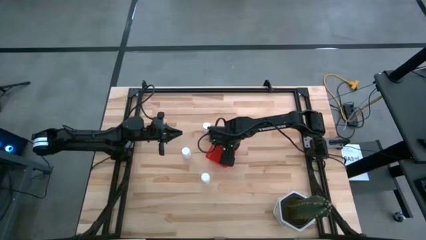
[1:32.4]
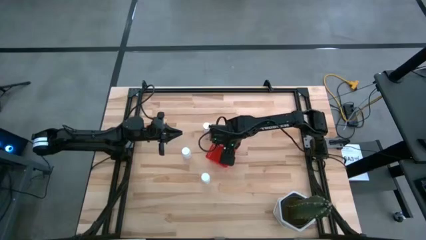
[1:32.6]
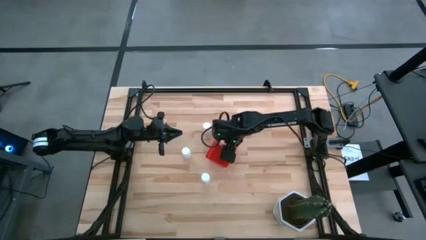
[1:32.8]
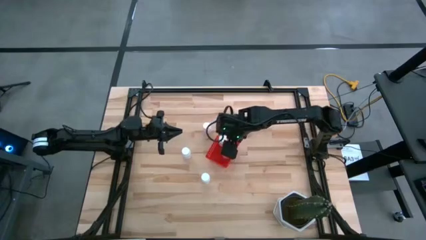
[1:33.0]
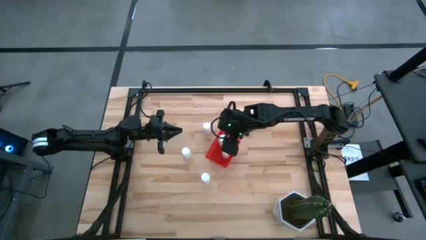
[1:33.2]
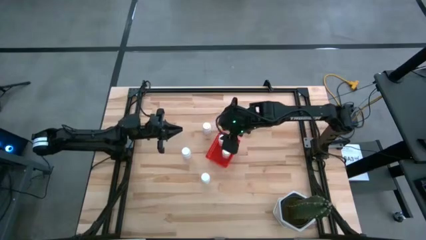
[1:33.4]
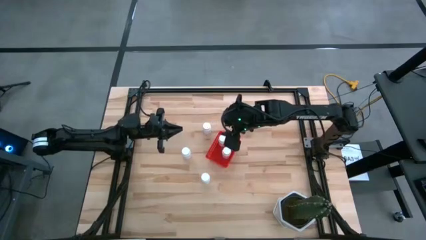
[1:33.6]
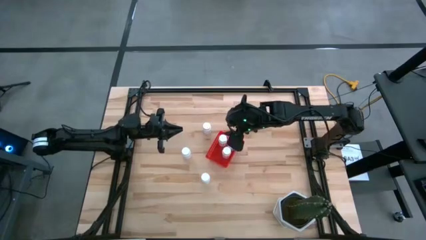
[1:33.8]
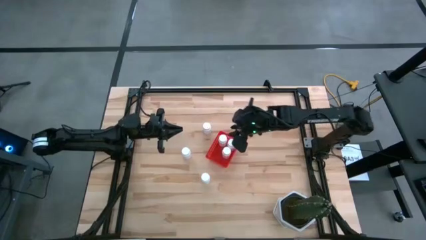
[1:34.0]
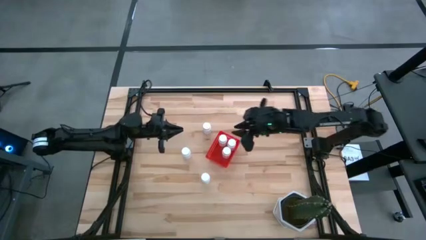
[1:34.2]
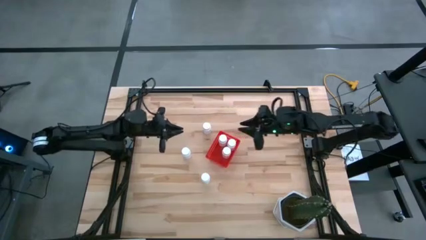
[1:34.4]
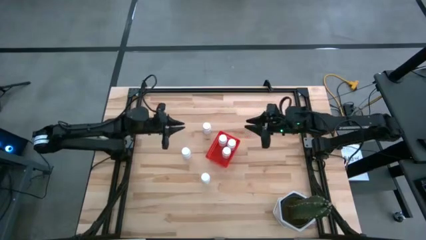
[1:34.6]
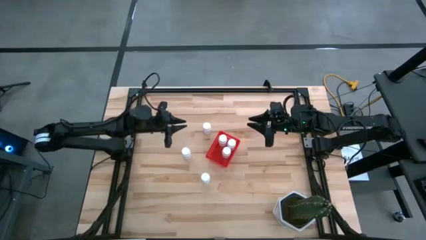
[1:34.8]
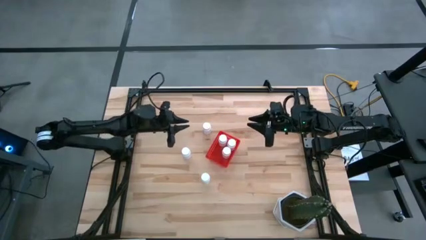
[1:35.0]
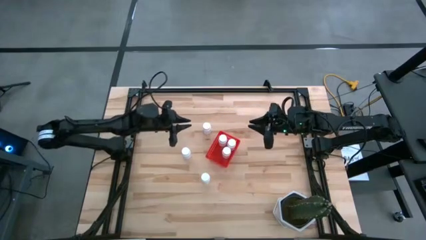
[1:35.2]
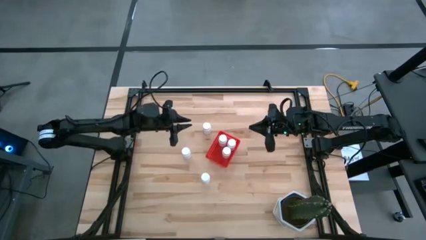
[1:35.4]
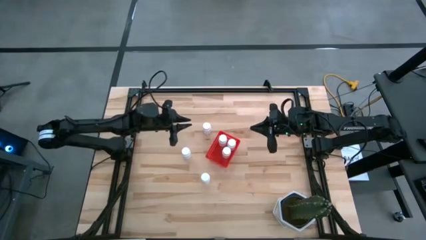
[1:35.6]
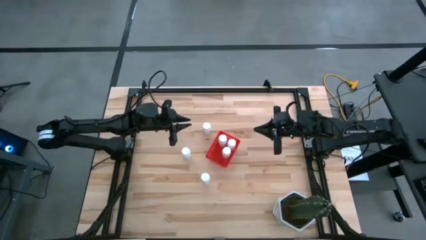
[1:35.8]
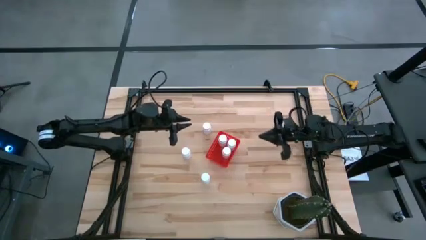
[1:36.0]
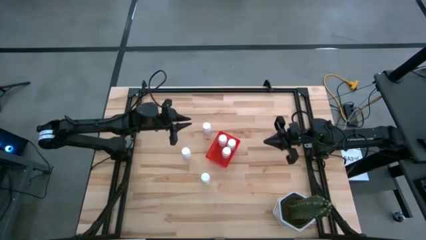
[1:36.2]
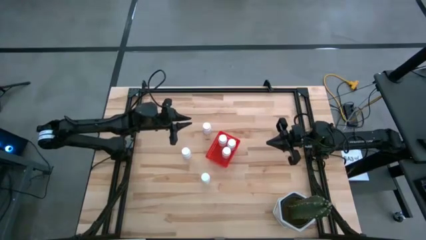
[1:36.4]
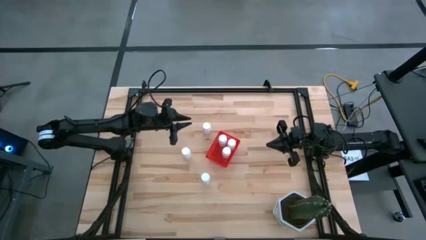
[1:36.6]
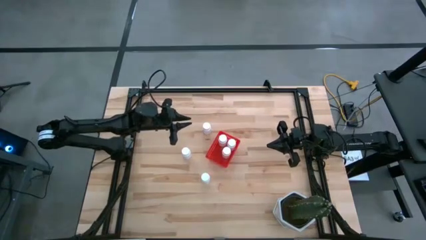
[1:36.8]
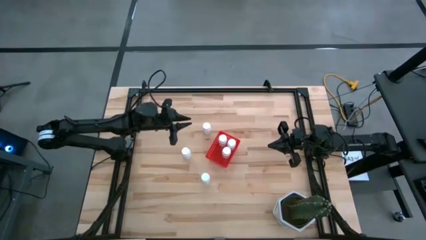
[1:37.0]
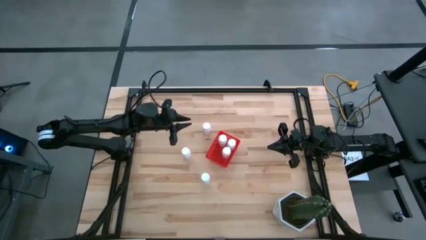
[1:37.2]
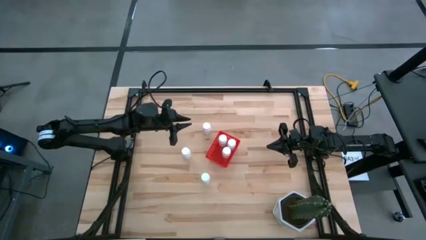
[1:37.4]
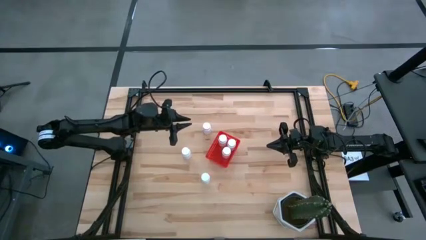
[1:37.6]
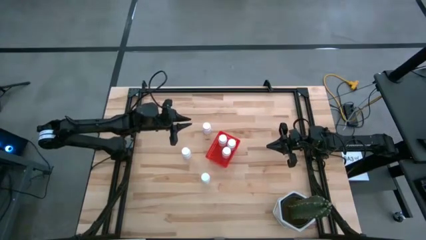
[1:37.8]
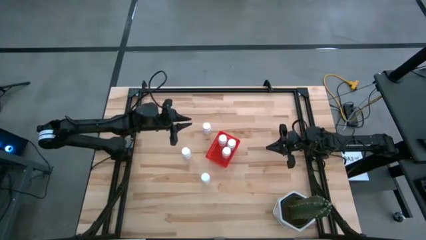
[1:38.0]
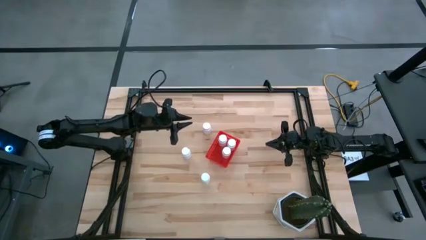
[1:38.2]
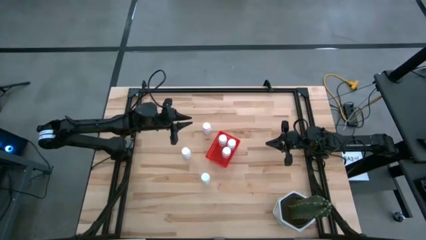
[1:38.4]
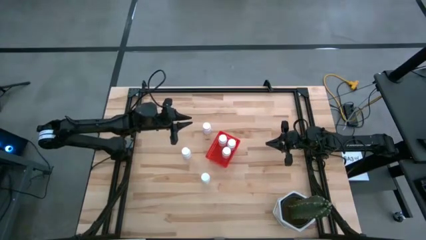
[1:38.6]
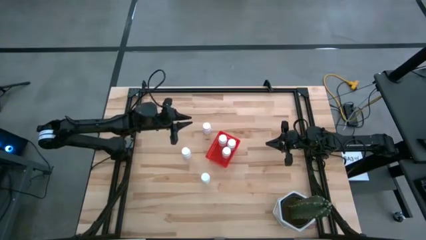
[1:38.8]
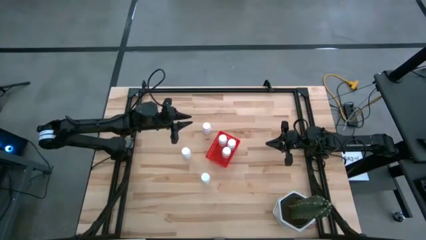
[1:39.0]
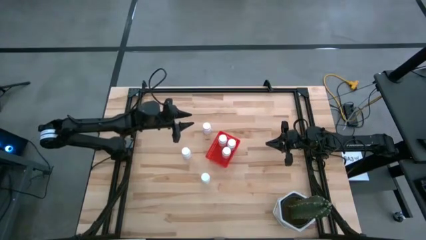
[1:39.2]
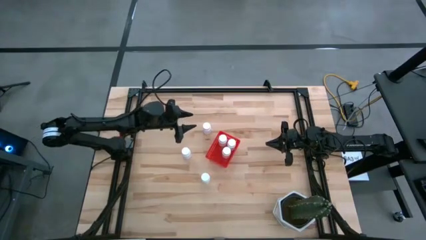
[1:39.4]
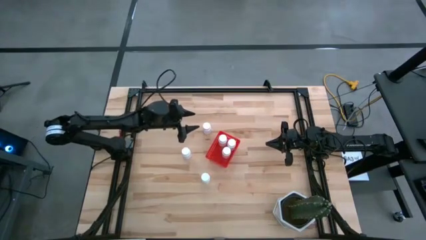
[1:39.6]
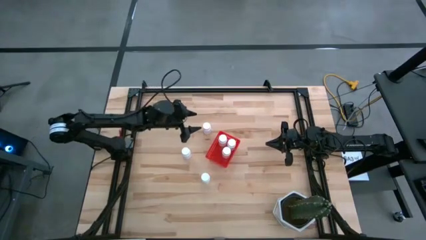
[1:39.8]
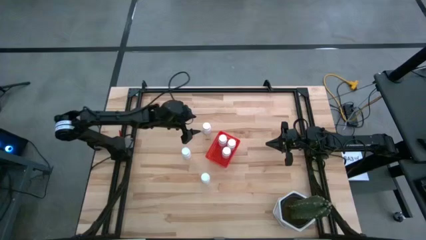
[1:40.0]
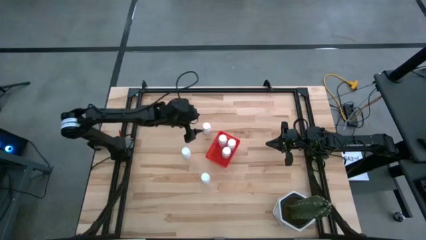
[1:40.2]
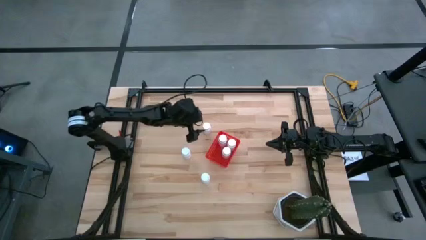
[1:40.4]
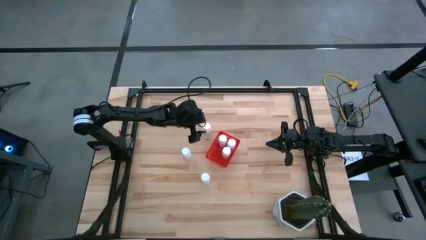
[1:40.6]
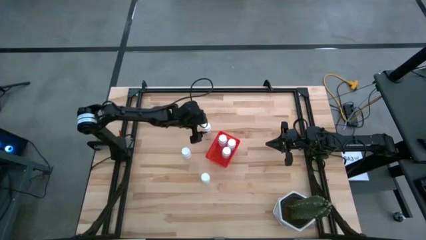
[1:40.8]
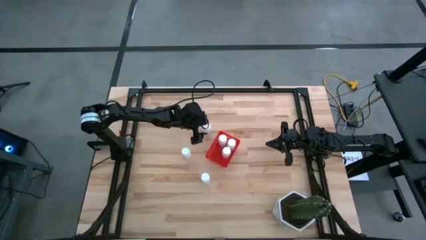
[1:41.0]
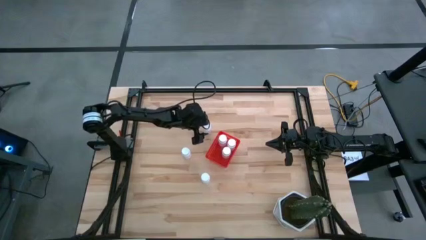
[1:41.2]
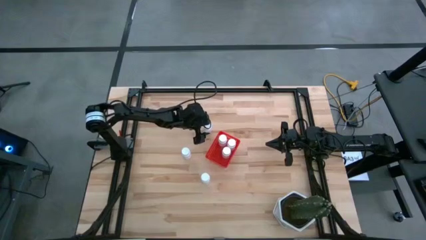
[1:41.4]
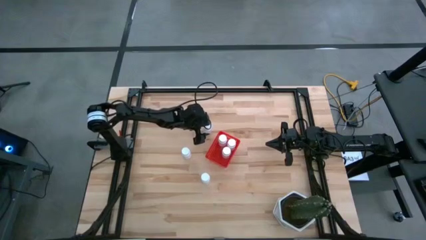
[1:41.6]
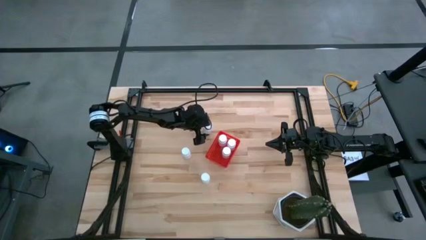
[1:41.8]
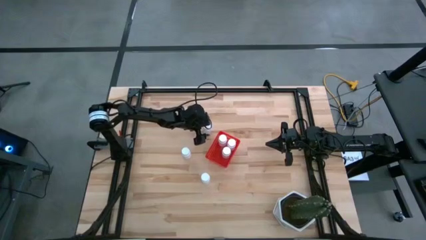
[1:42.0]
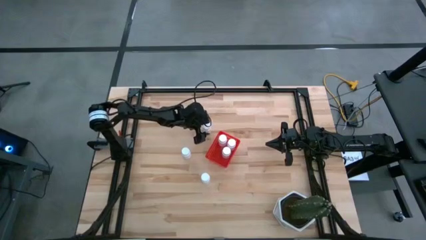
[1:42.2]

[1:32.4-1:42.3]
Task: Pick and place pill bottles into a basket
Put the top white pill bottle into the red basket

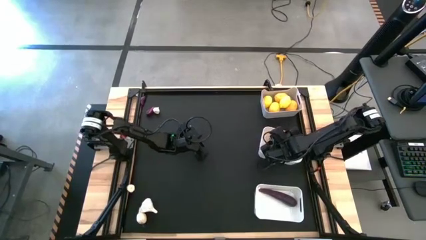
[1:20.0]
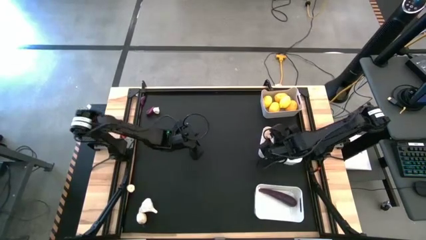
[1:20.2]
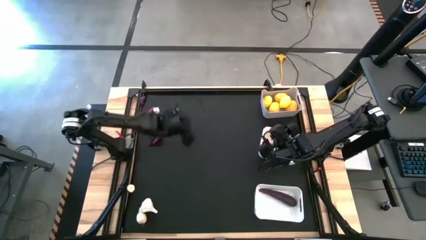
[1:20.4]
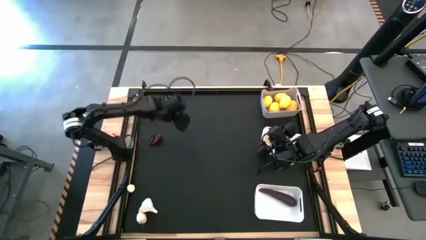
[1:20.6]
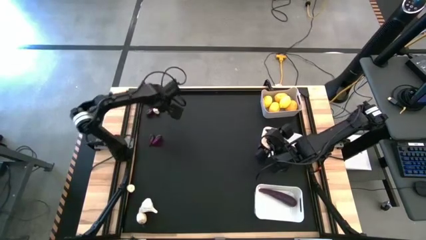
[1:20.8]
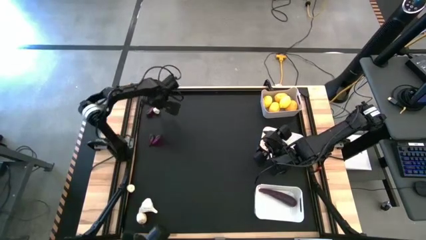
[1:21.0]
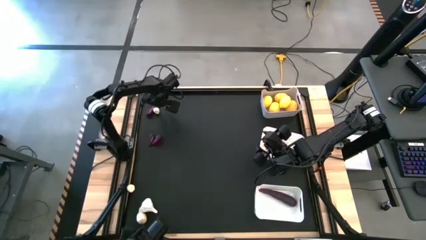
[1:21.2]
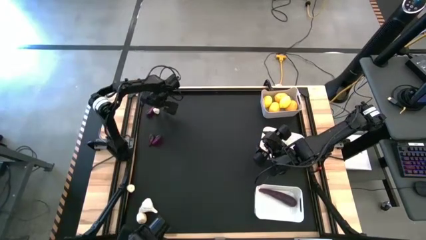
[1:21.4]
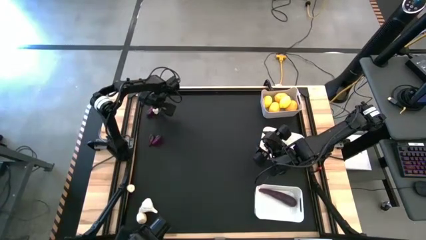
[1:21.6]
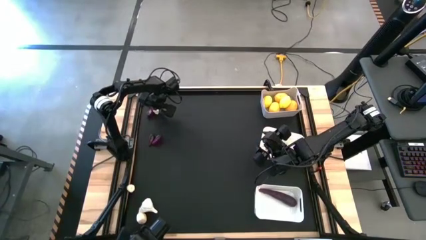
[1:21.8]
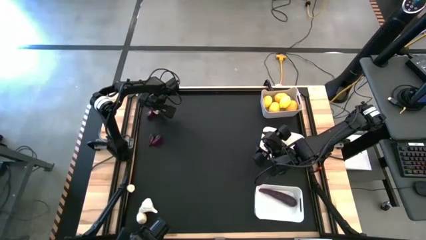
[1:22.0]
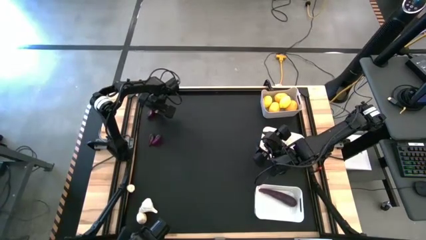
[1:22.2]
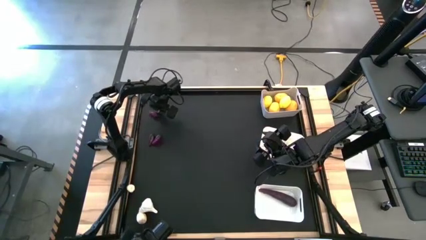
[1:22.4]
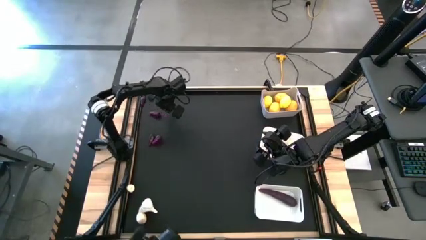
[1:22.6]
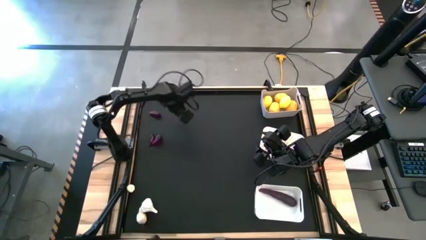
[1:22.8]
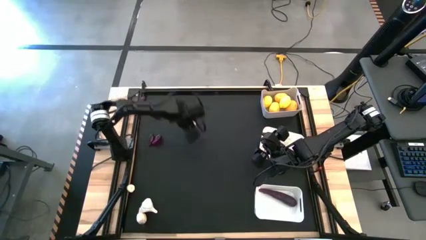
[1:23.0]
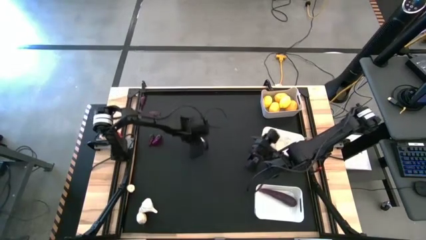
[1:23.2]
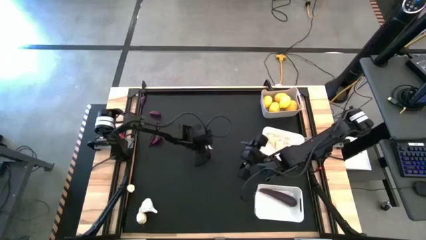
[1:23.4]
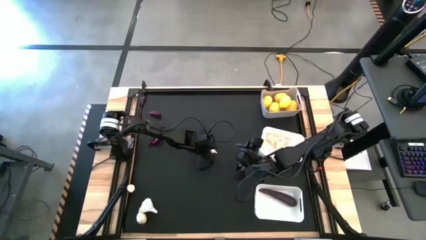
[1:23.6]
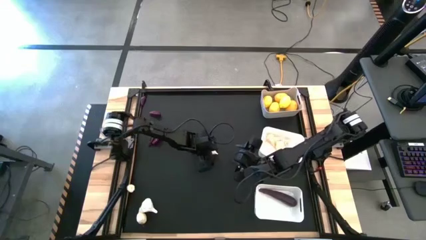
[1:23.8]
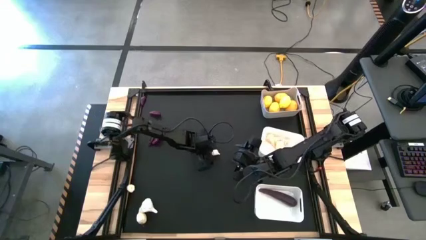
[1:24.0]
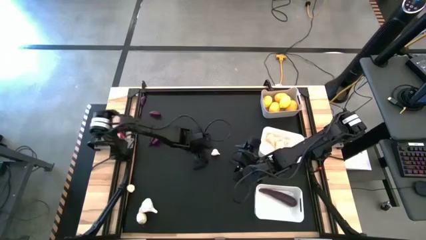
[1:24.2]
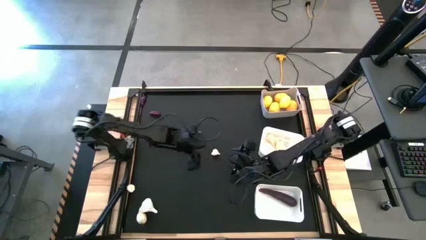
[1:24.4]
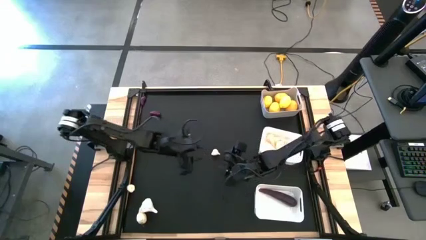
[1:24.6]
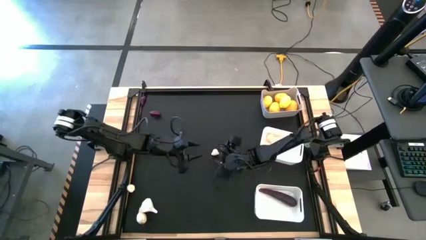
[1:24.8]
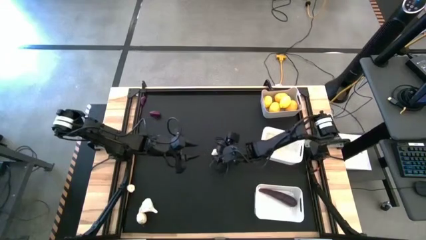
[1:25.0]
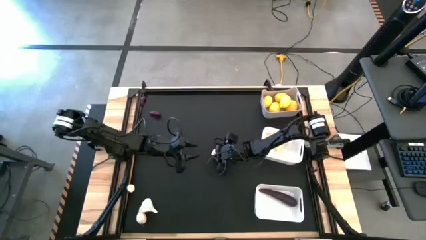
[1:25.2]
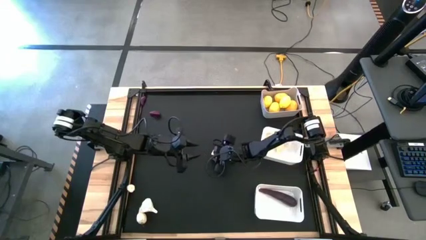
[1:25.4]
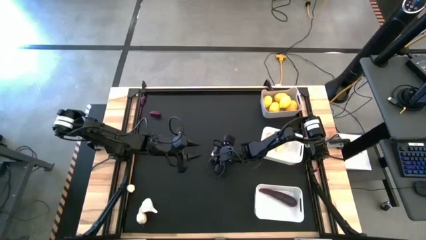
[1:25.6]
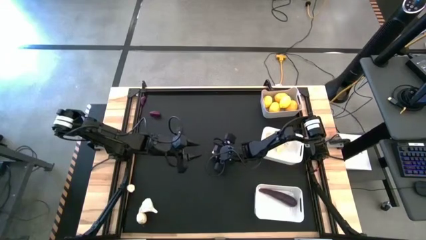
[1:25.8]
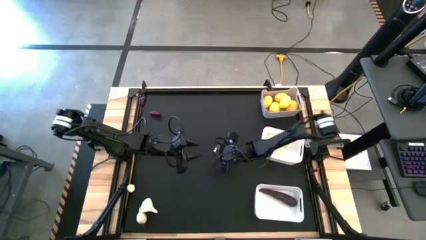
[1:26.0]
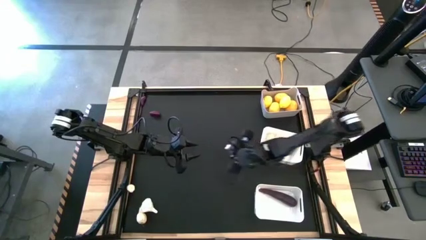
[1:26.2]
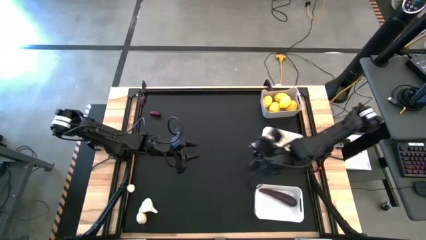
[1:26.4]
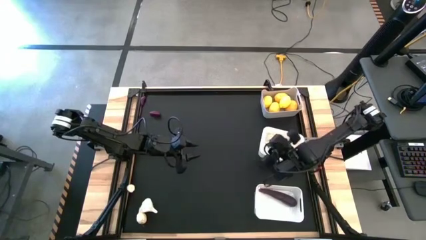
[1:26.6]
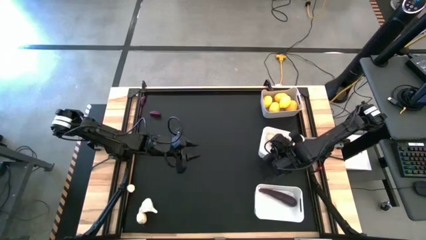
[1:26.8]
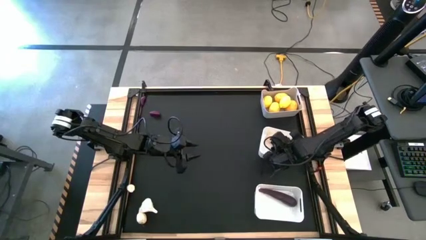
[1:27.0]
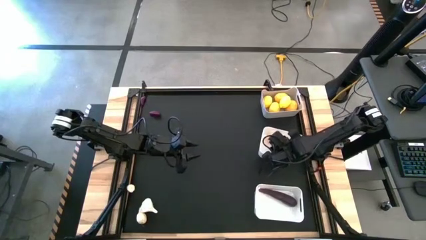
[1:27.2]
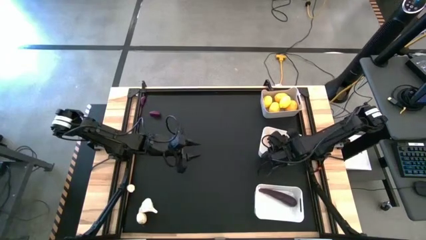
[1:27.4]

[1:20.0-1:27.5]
Task: Sort produce into baskets
Put the garlic into the top white bin
